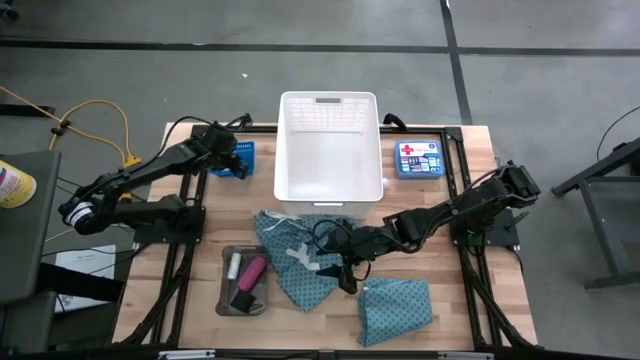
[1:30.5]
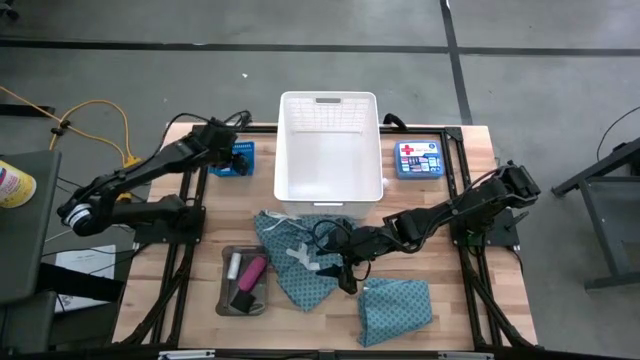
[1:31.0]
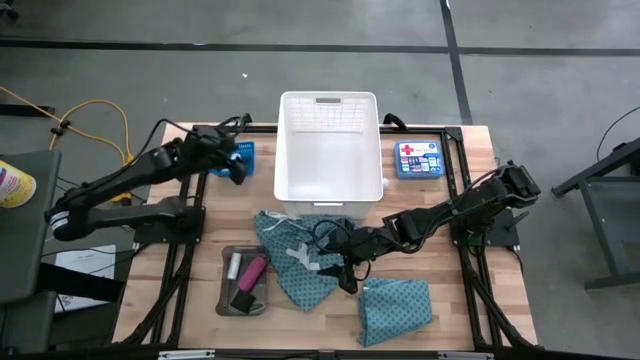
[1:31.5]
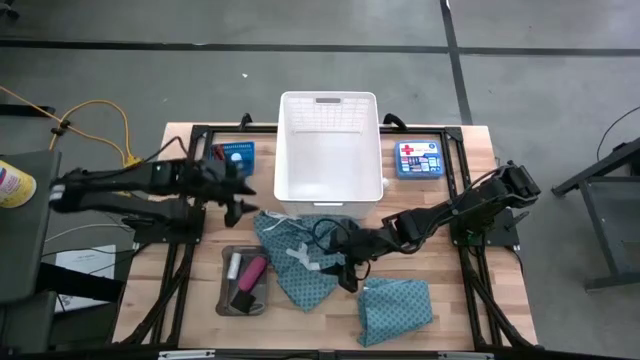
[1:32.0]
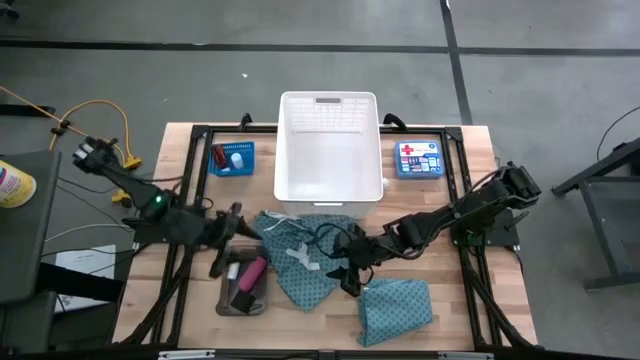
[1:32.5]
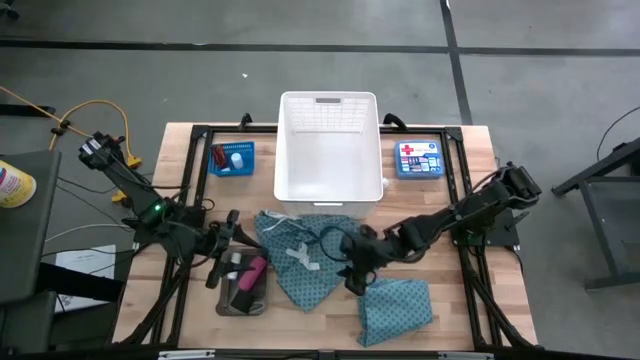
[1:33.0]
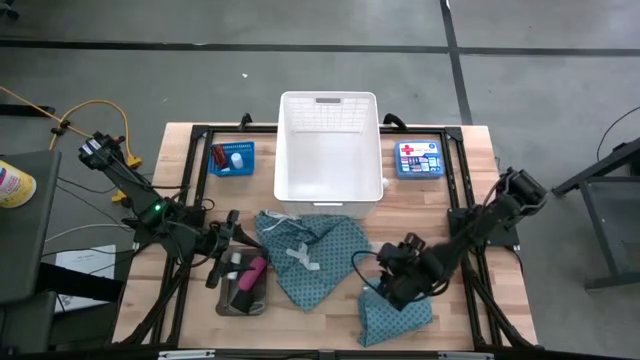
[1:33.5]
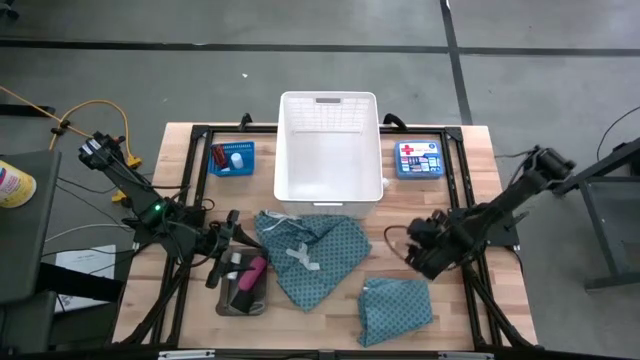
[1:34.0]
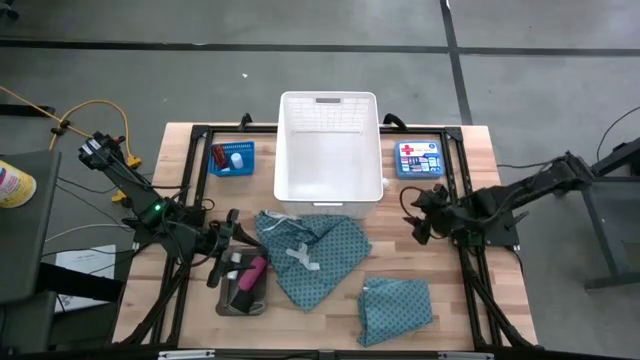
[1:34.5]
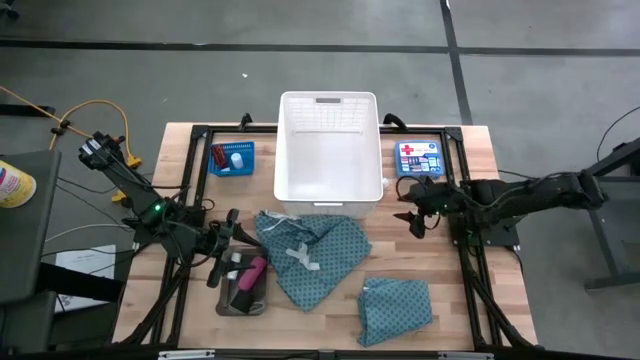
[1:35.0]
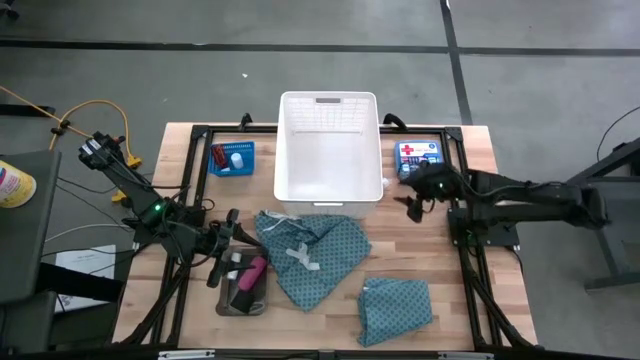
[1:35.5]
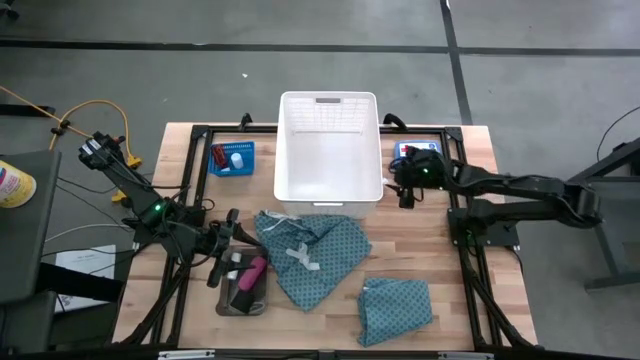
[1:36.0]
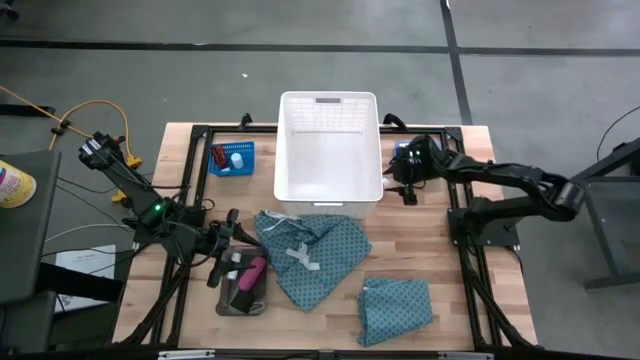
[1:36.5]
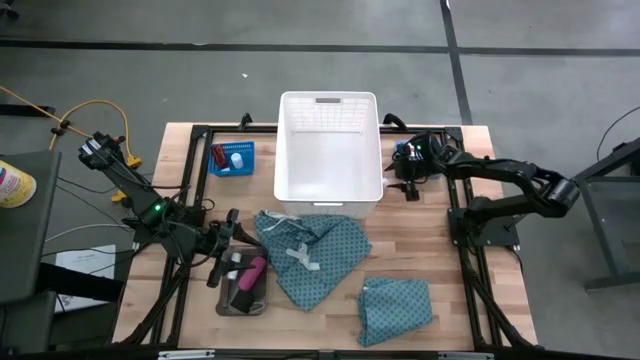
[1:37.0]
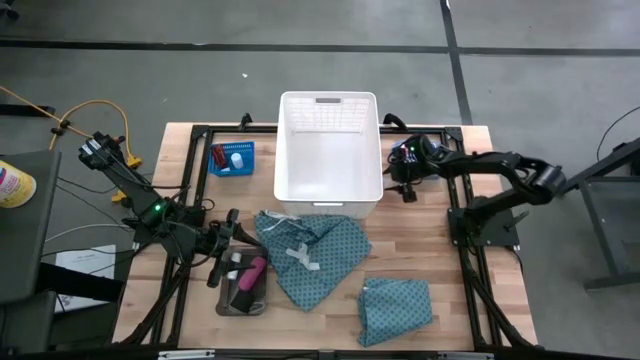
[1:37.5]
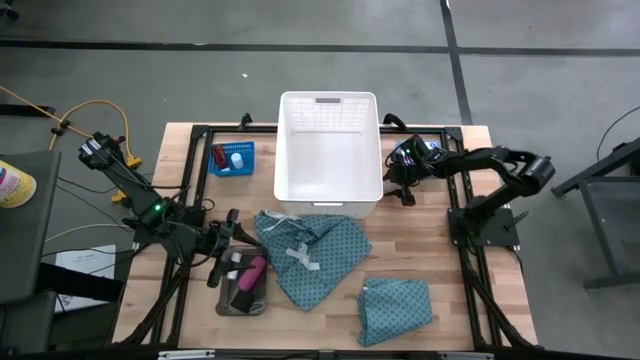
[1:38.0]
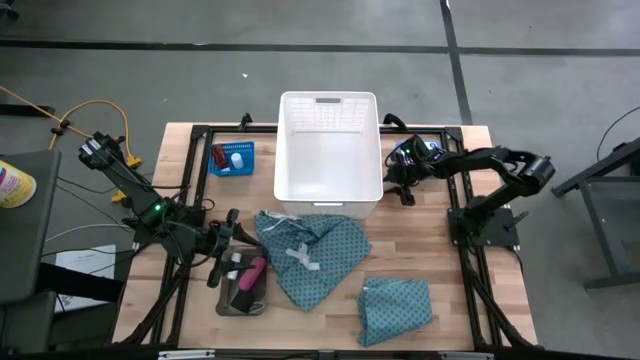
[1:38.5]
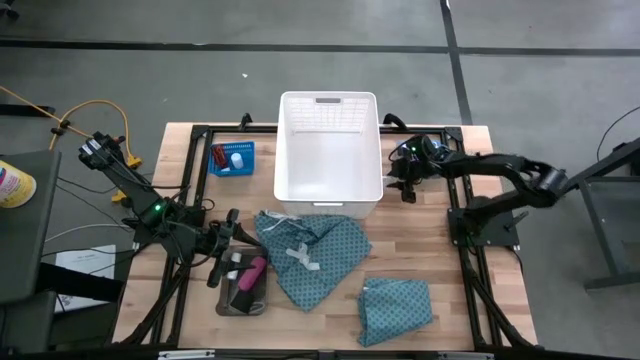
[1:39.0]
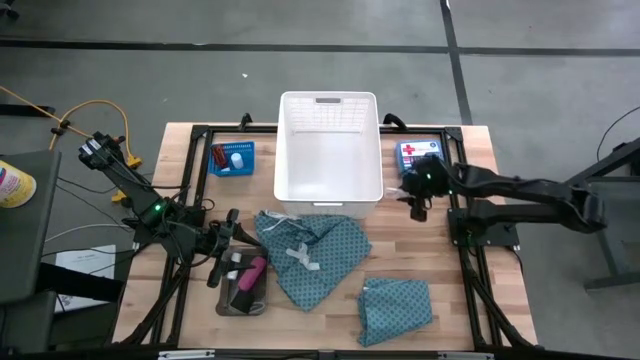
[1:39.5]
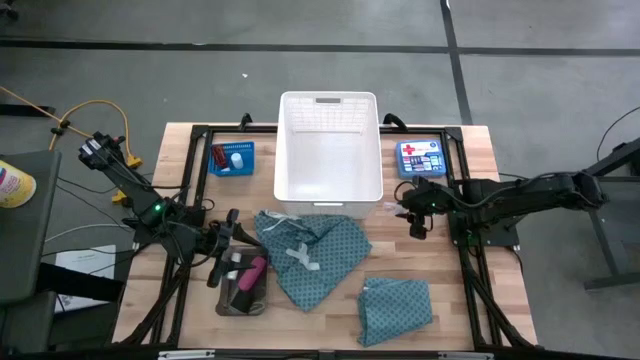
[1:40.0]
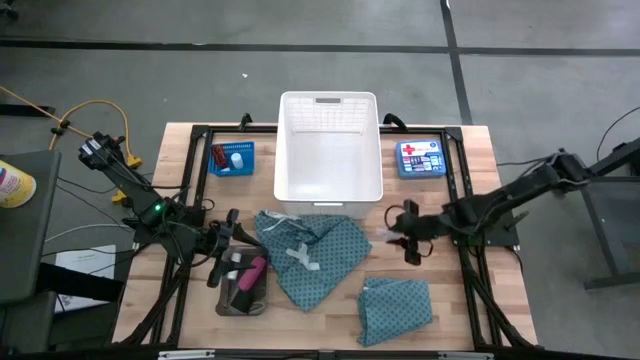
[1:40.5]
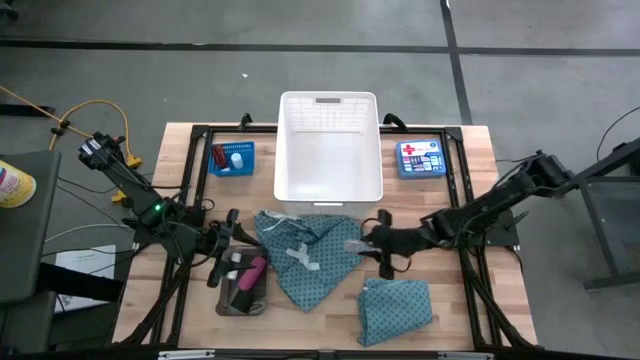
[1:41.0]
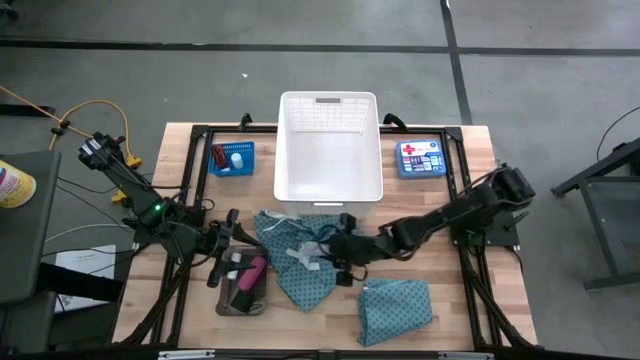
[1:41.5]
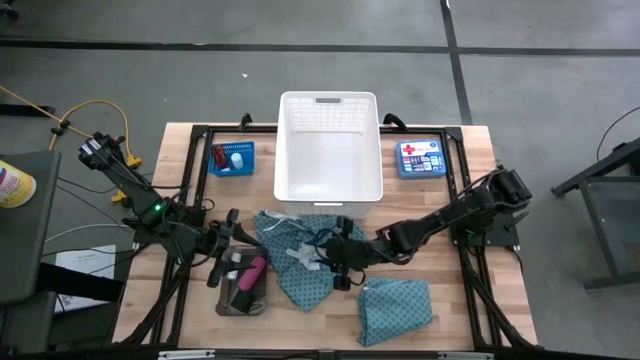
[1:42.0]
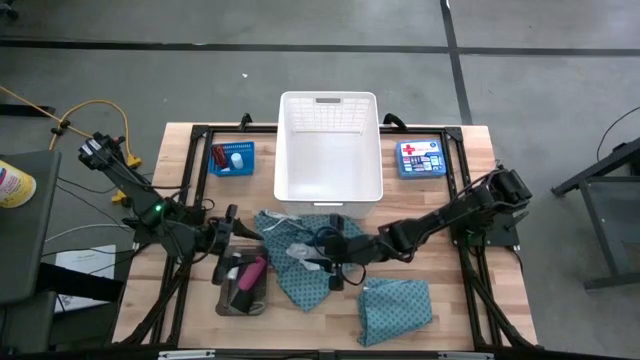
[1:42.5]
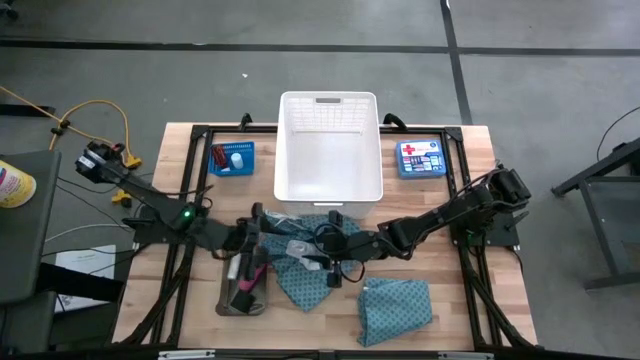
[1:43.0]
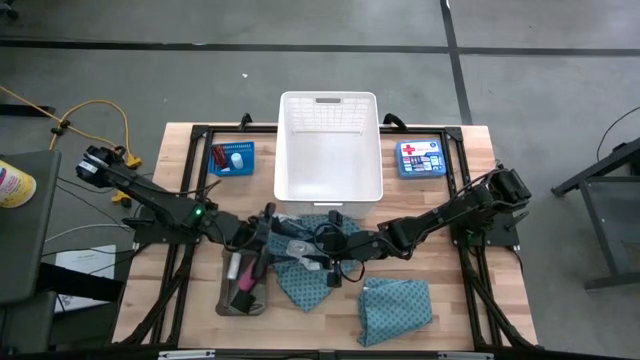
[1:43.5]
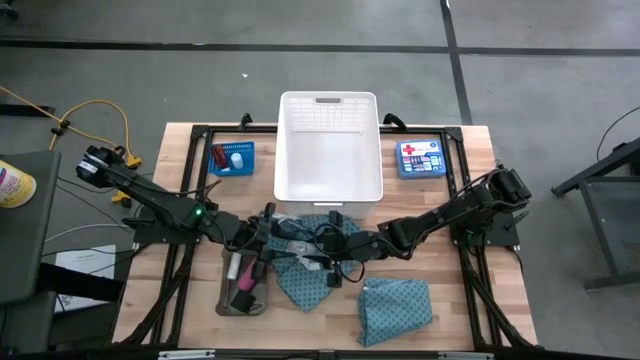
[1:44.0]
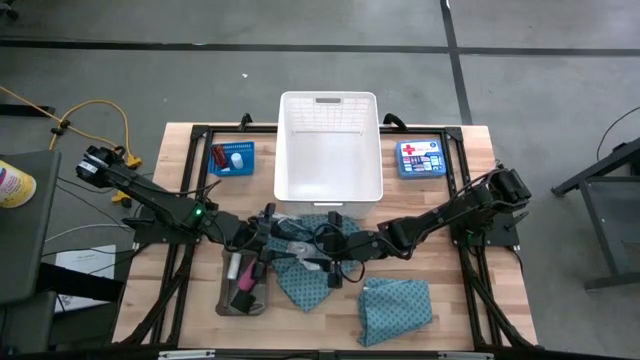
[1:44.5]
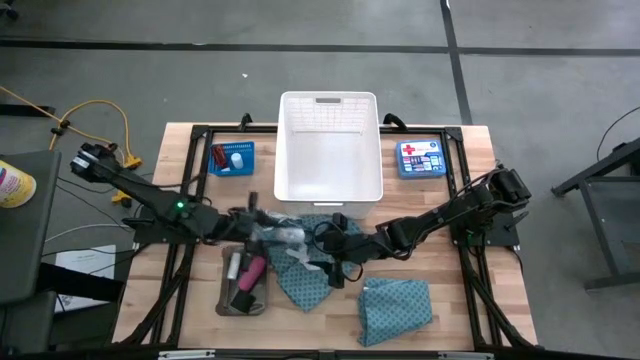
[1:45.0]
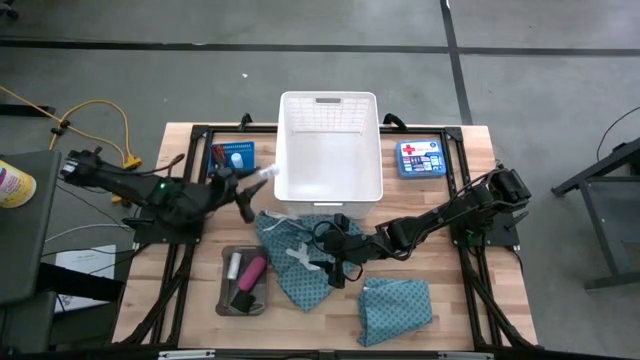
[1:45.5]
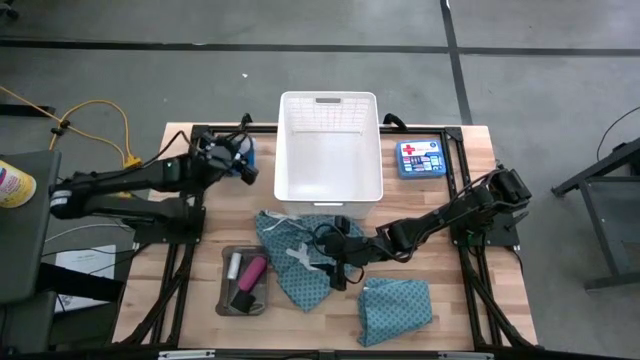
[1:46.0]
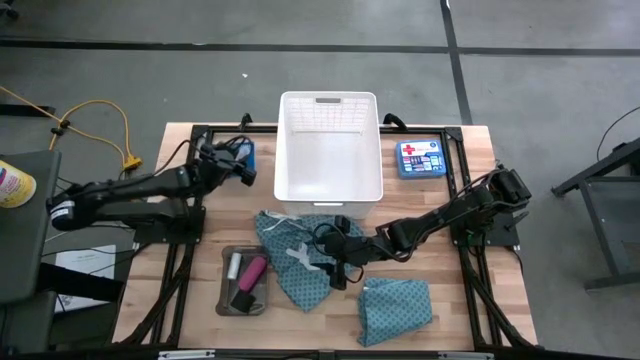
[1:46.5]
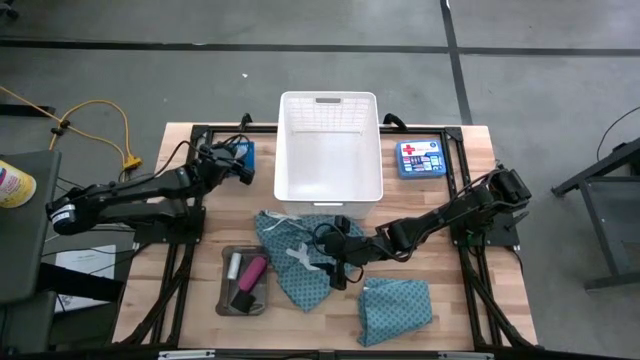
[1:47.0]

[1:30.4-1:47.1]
Task: Pick & place medical supplies in basket/bin
Put the transparent bottle into the blue bin

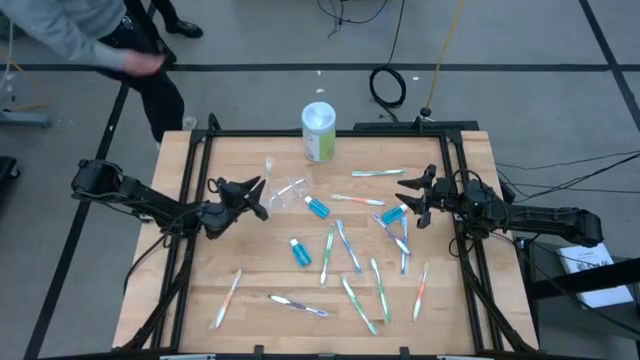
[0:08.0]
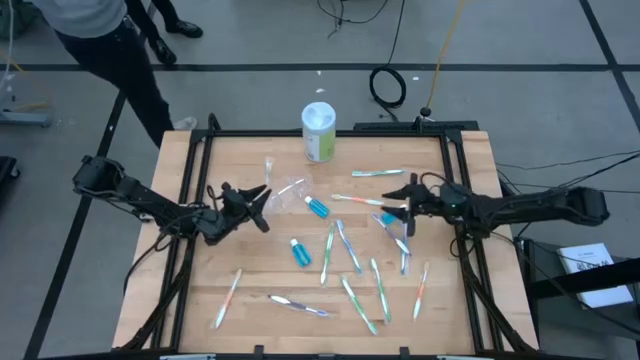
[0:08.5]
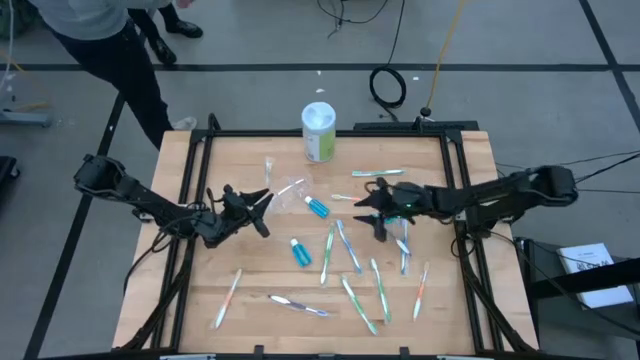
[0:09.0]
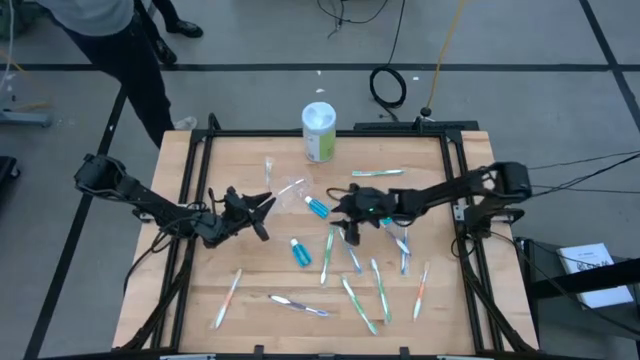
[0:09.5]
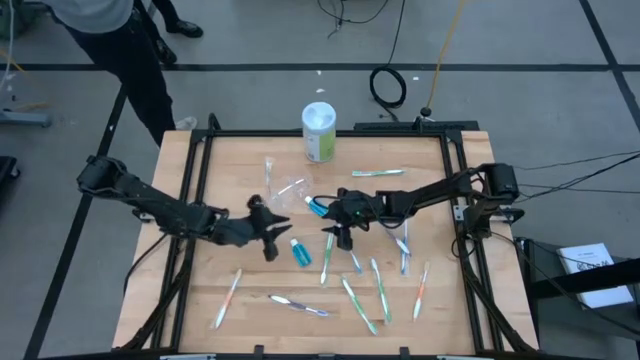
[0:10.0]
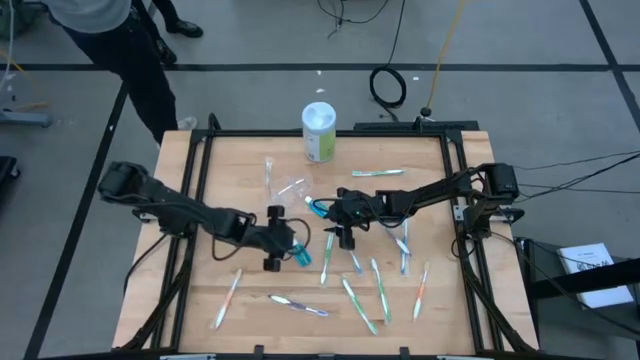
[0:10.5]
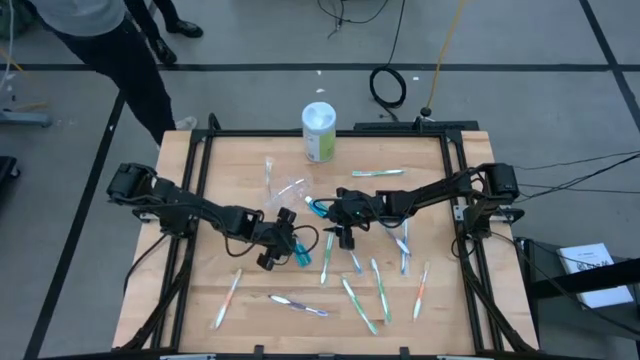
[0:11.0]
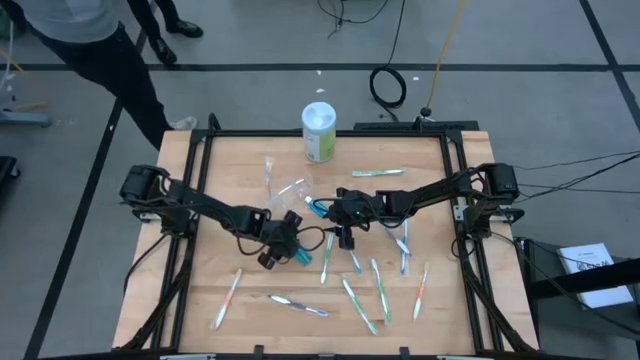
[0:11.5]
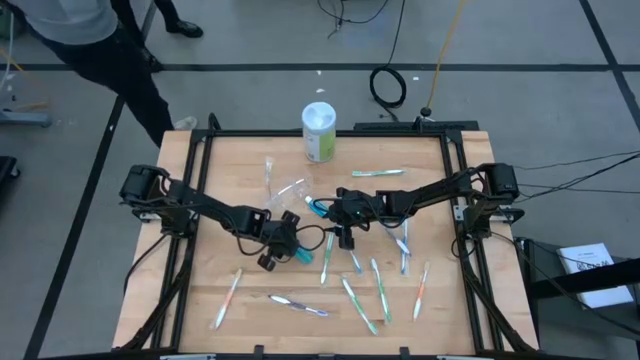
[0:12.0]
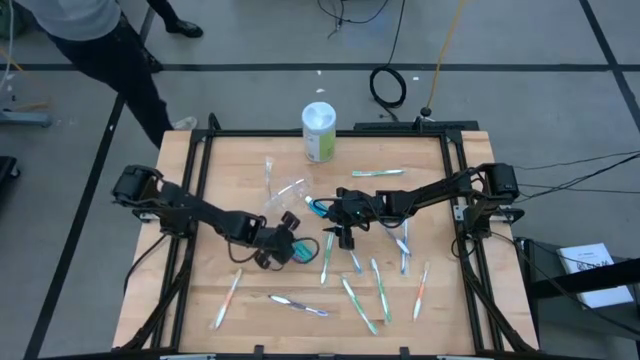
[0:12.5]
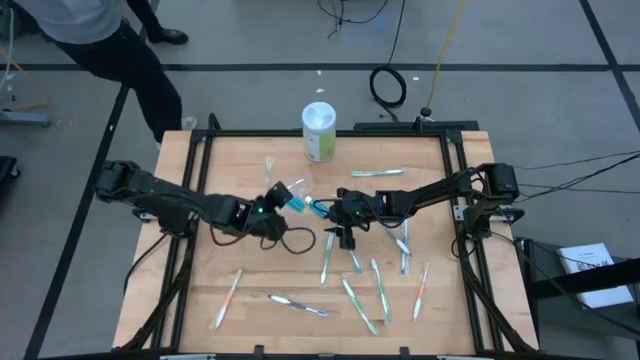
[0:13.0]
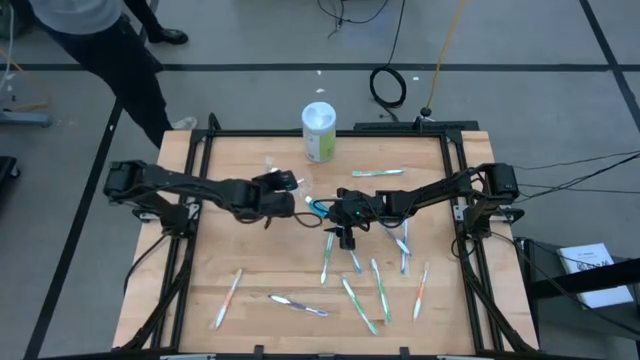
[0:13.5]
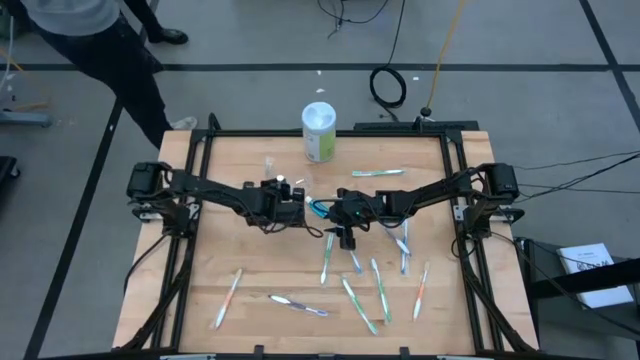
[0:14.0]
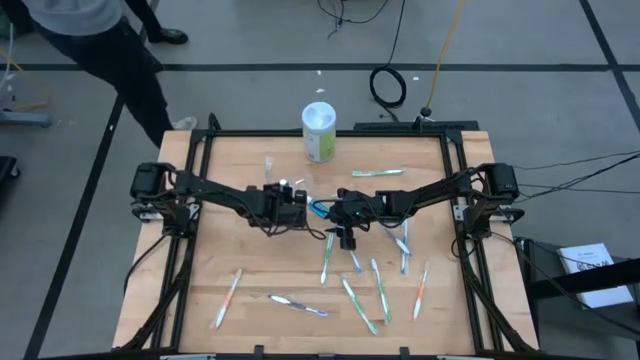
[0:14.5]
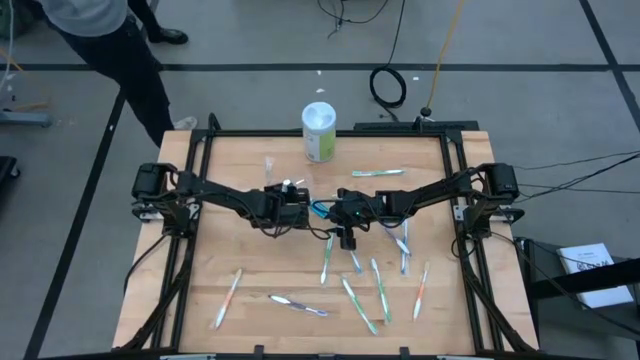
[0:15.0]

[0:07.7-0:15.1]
Task: Pick & Place toothbrushing station
Put the blue mouthwash bottle into the transparent organizer
